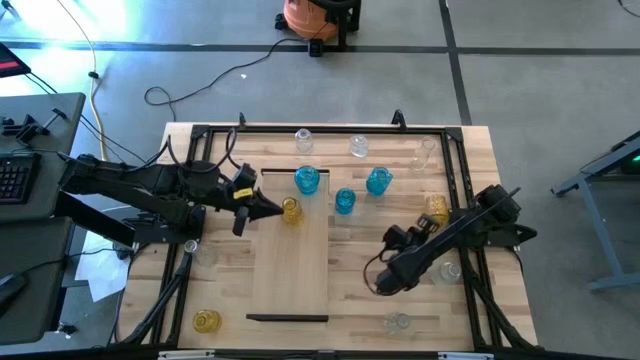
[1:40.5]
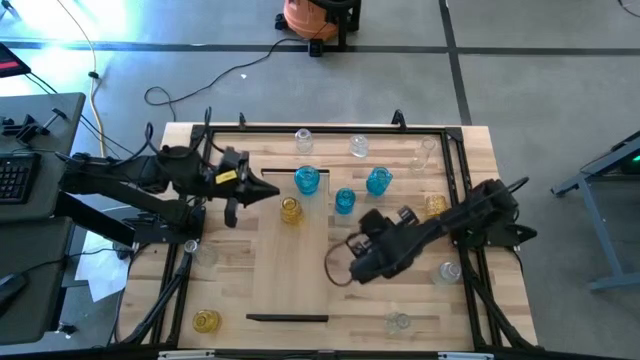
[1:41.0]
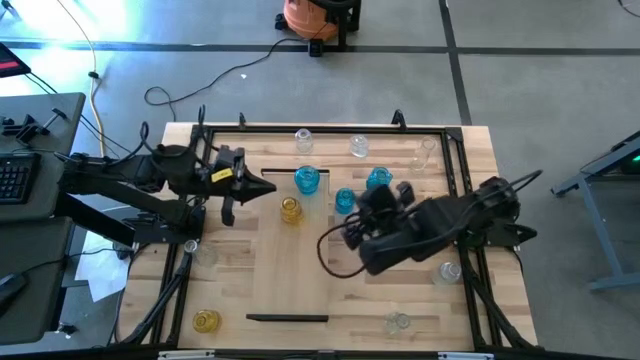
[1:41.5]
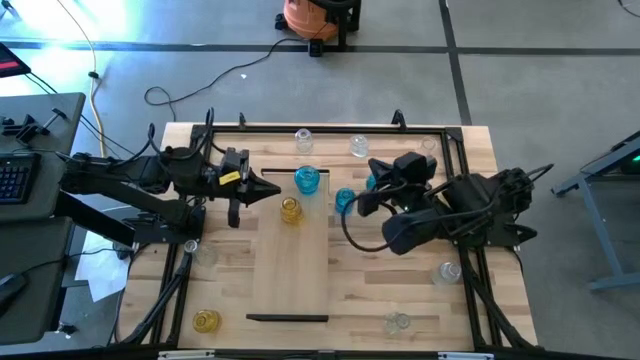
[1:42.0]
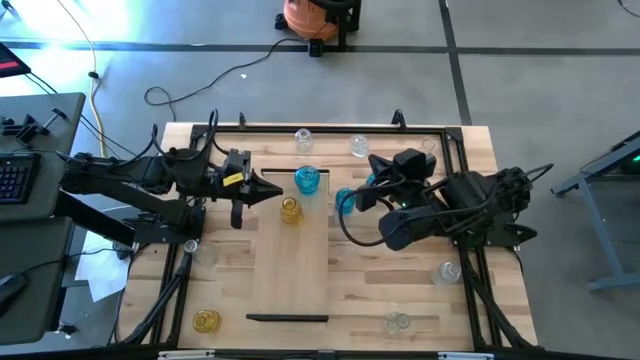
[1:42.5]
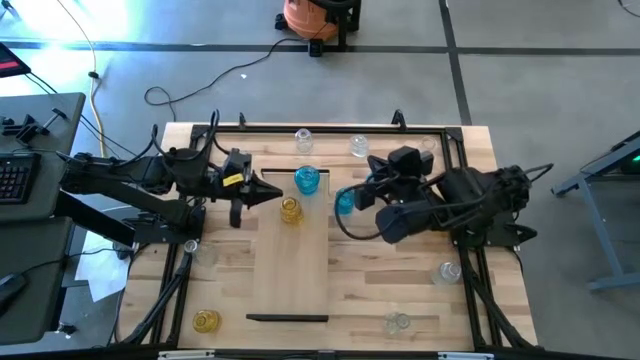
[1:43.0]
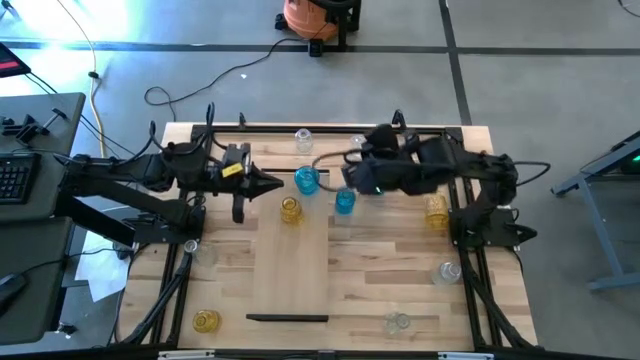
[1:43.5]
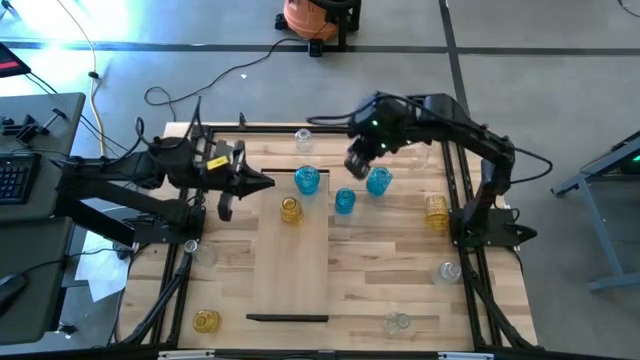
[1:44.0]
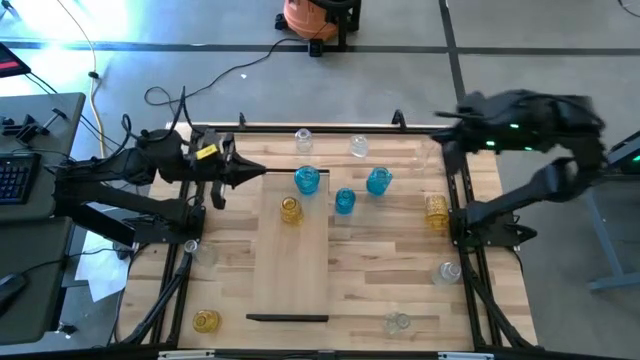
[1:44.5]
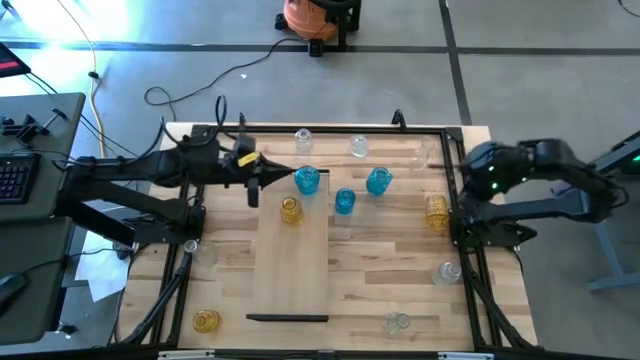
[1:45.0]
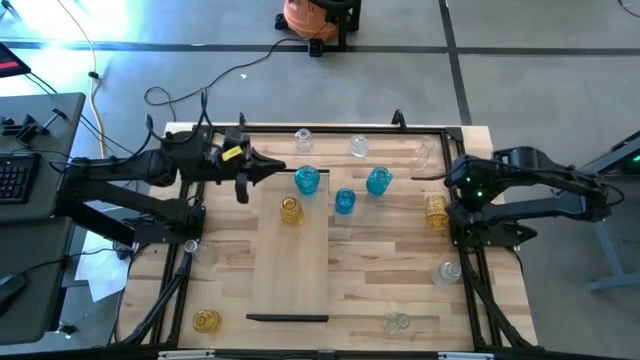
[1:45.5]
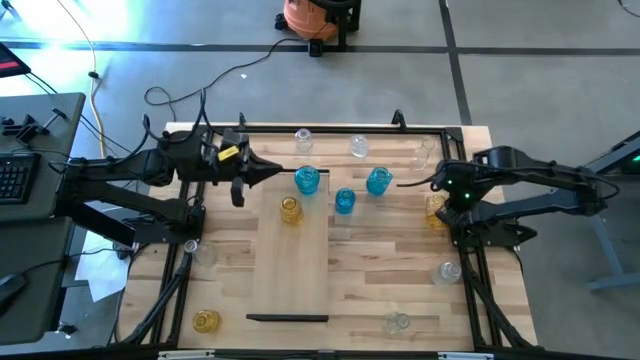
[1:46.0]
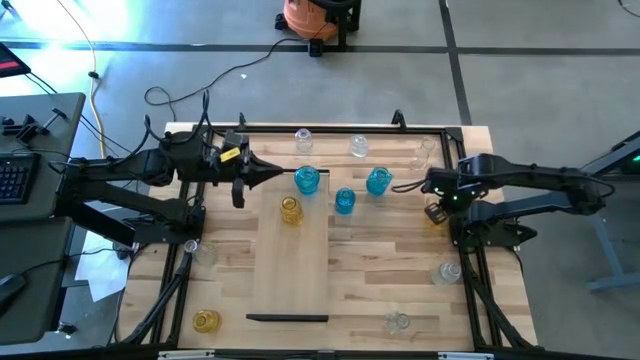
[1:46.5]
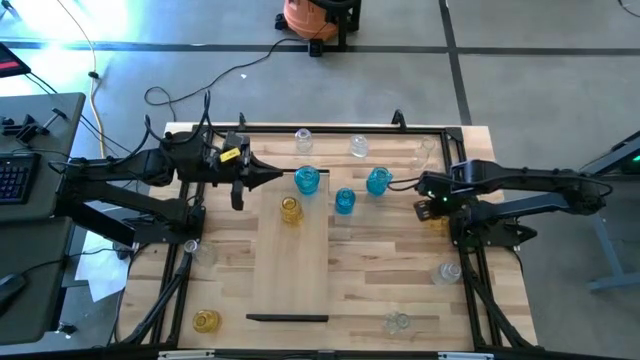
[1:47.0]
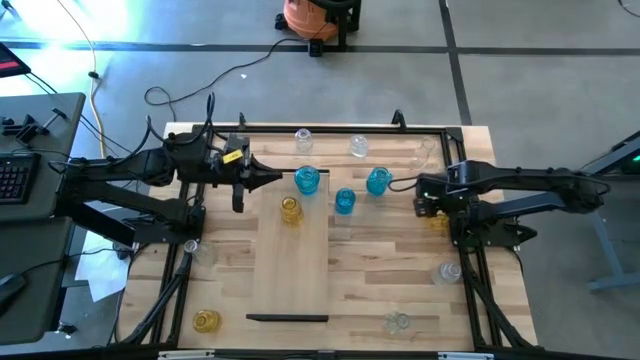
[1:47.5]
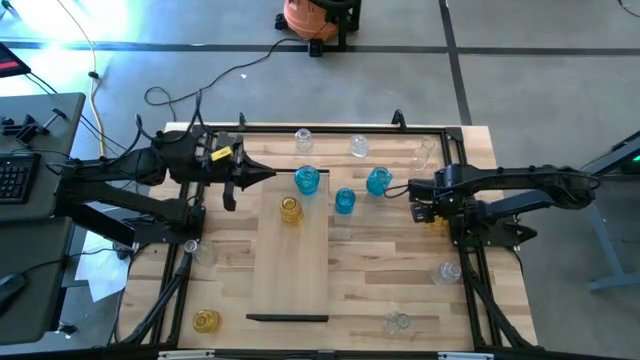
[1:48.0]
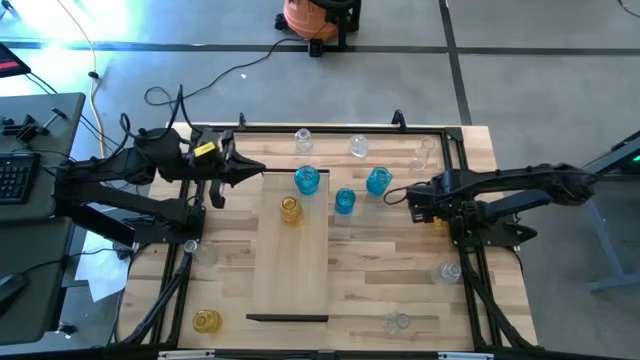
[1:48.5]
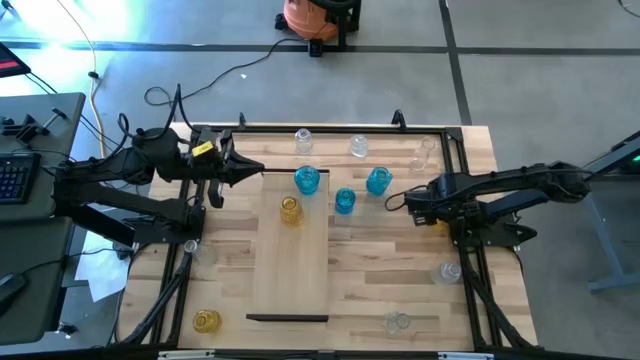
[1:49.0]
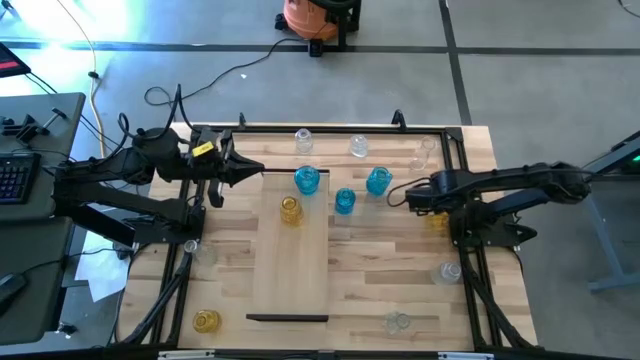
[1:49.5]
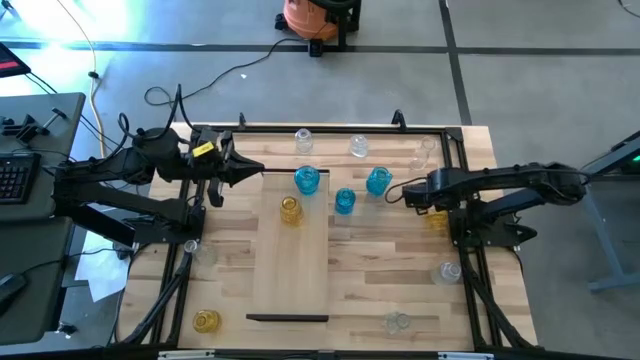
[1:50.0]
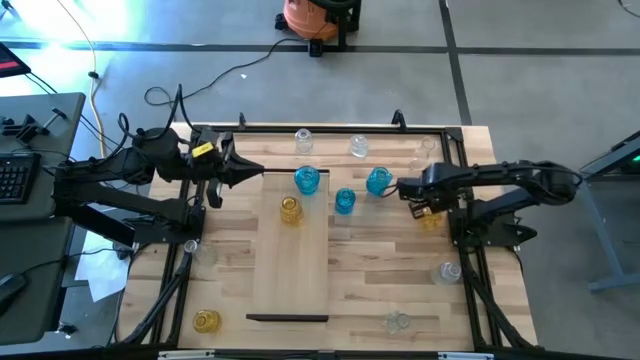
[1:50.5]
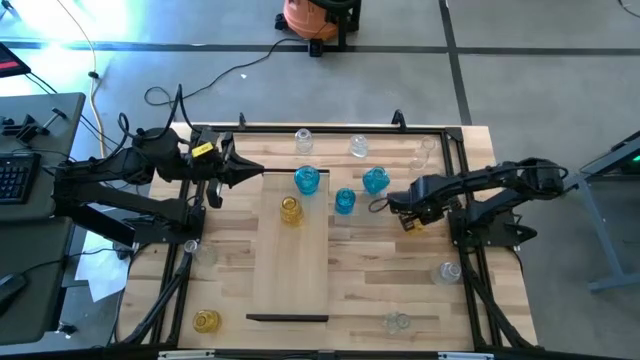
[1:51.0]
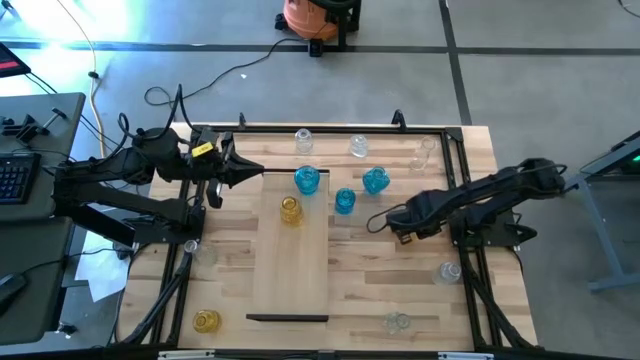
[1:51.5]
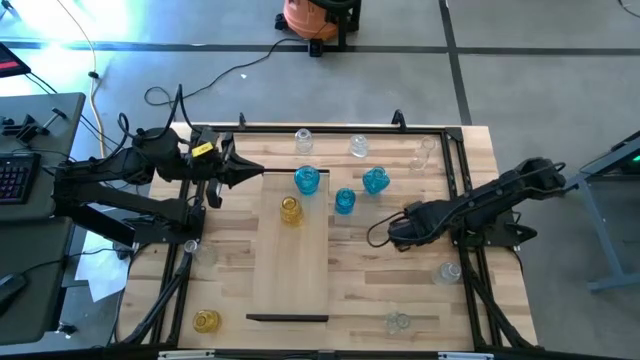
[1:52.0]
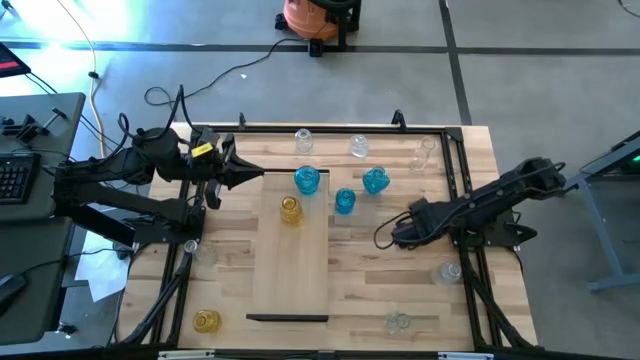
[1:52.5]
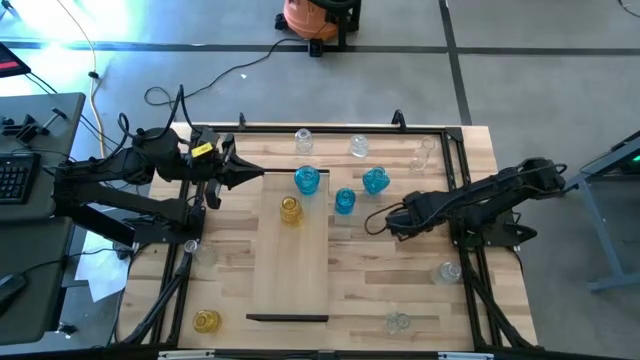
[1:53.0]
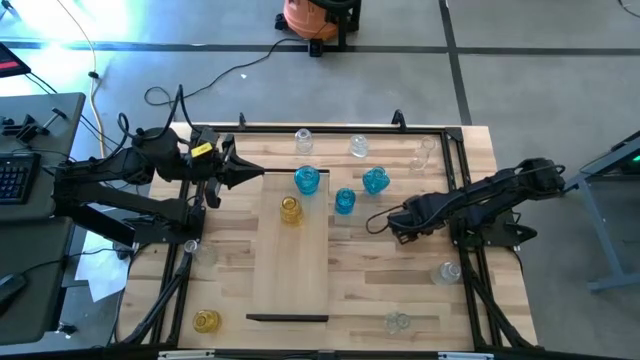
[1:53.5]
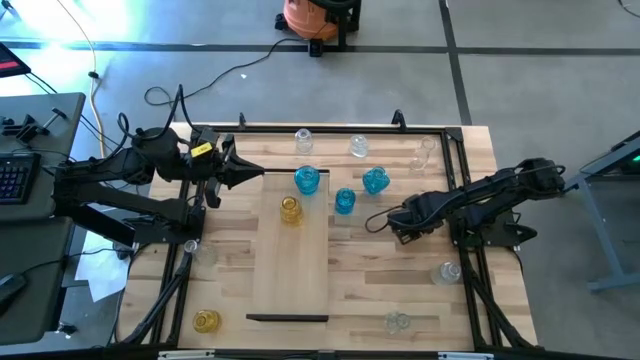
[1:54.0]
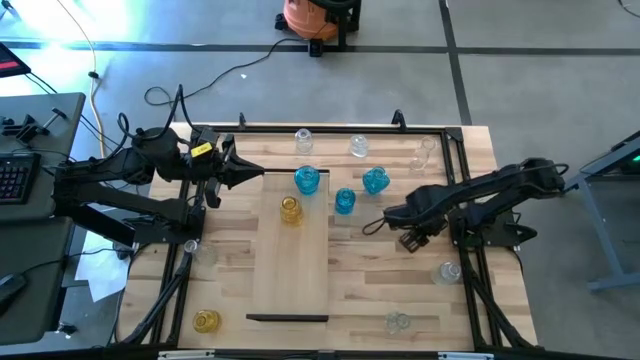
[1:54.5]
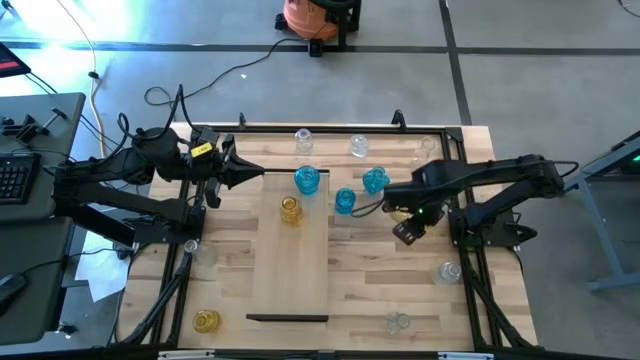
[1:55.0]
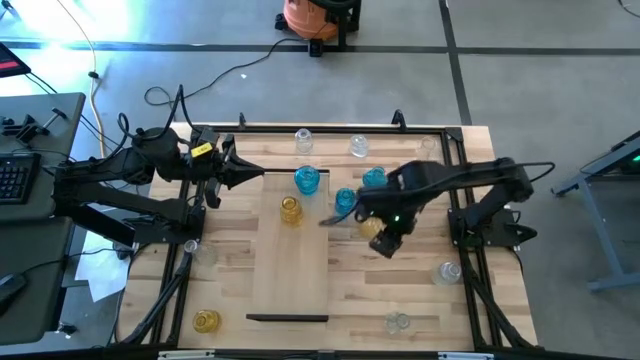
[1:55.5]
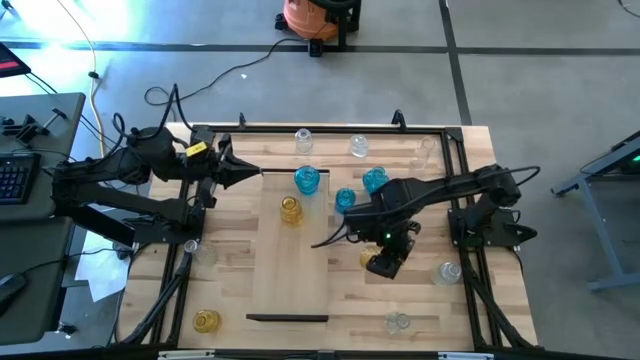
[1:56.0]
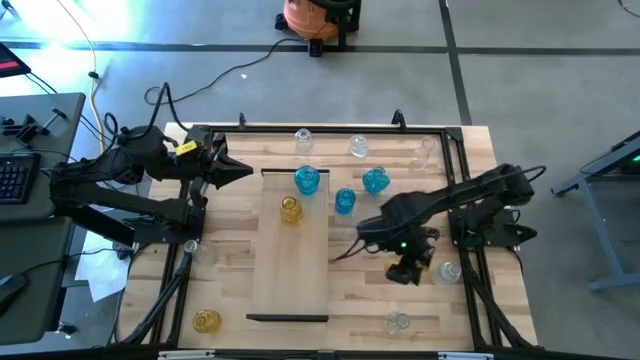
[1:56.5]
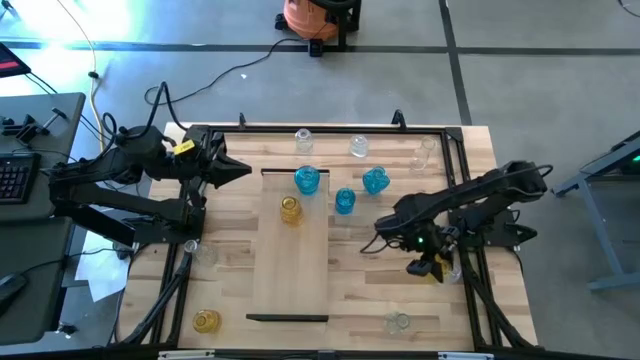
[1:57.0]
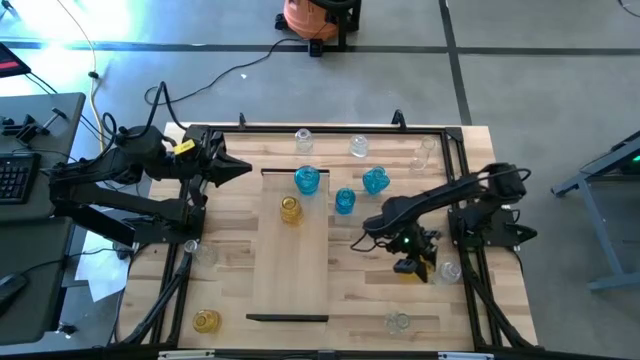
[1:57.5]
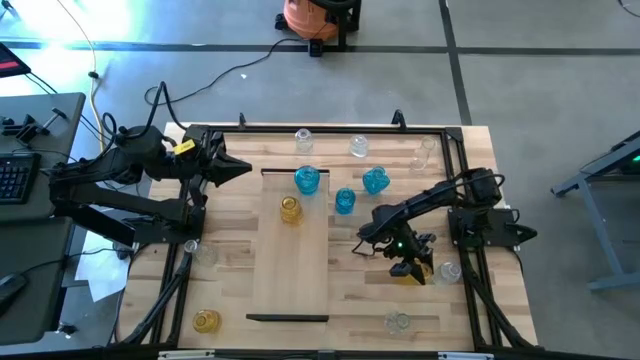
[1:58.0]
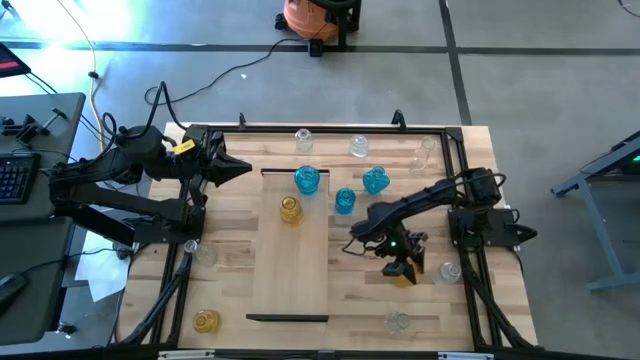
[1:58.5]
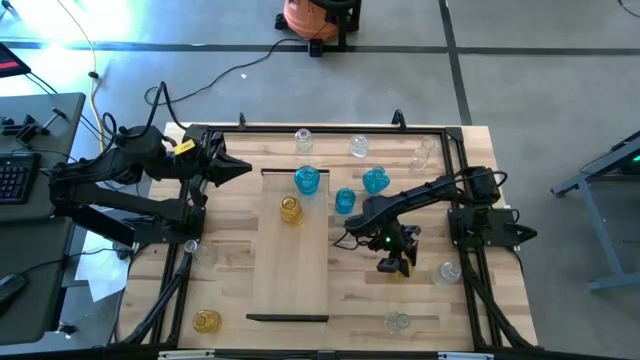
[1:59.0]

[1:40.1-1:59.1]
Task: sort vases onto shelf
Put the yellow vase on the shelf to align with the other yellow vase

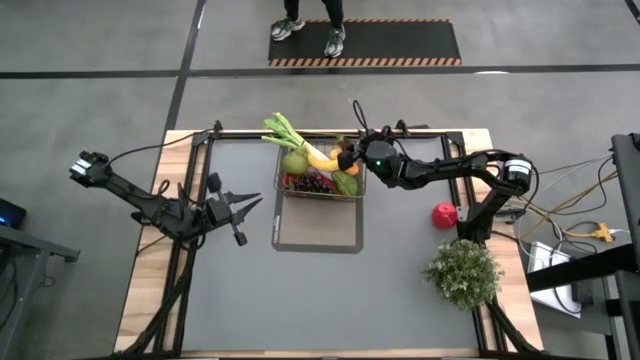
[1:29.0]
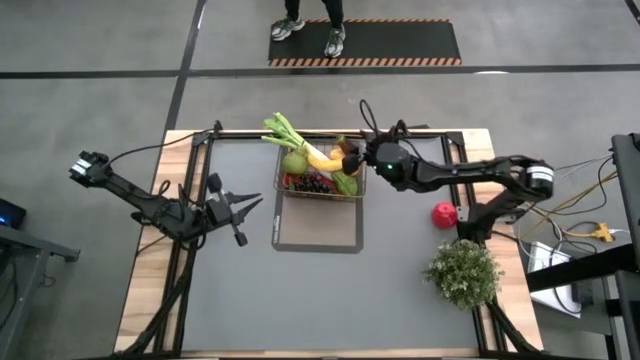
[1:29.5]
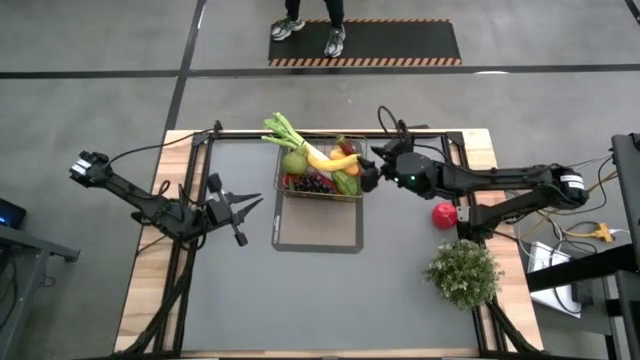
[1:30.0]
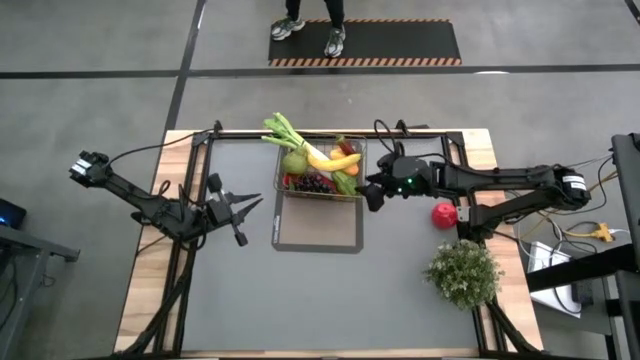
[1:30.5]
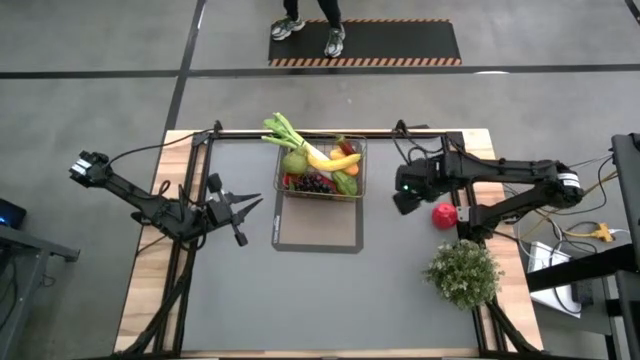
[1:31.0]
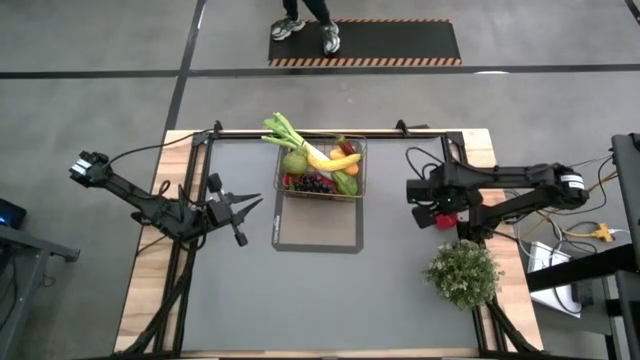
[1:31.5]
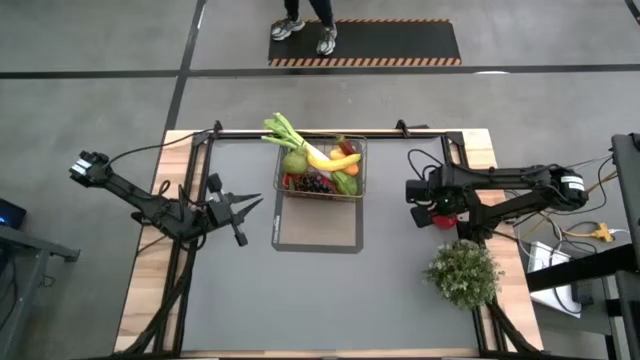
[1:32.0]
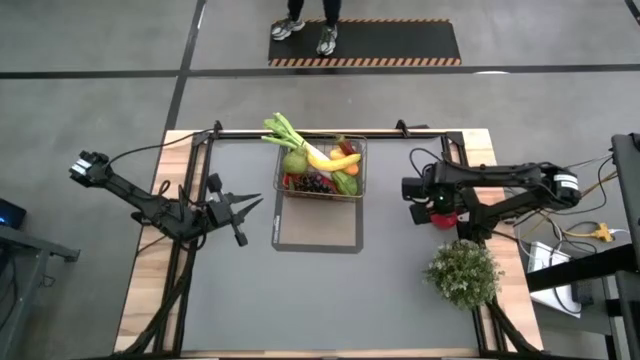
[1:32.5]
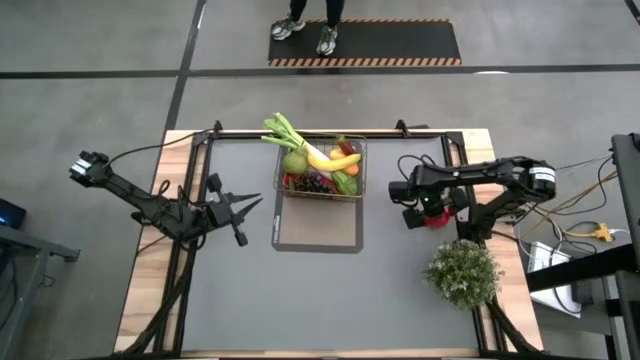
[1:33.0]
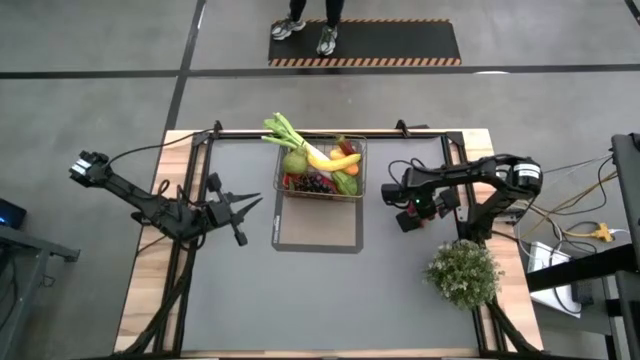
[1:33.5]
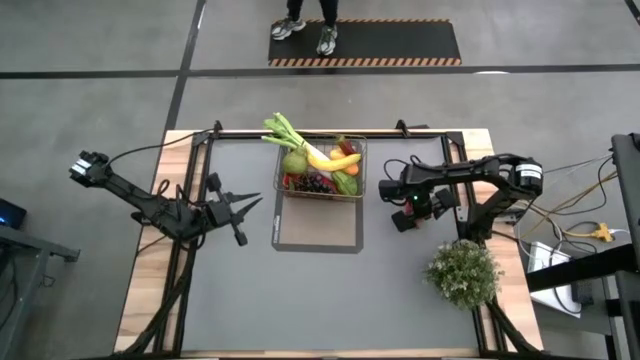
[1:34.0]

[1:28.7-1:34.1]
Task: Build produce basket
Put the apple into the wire basket
